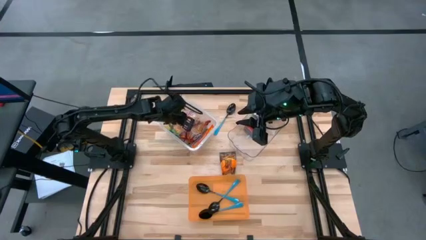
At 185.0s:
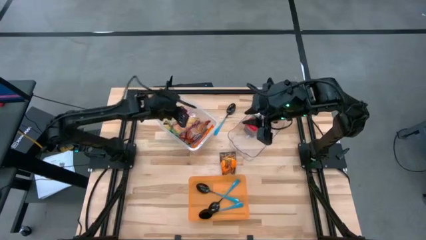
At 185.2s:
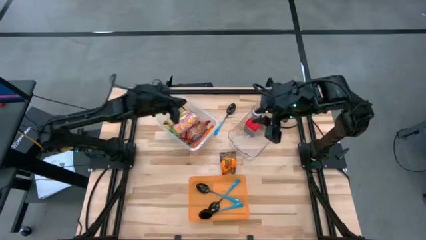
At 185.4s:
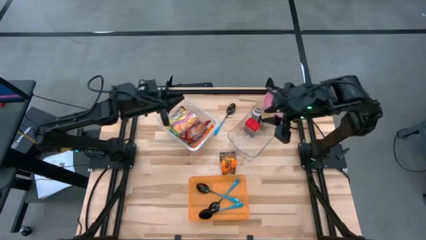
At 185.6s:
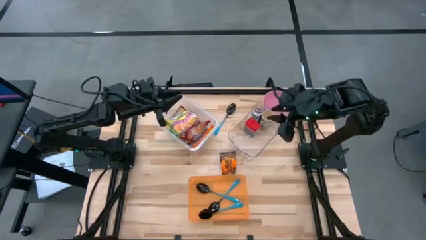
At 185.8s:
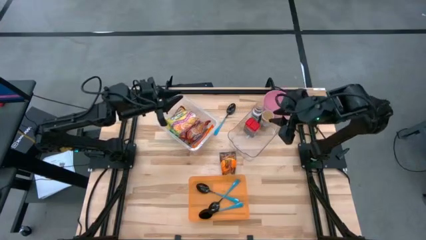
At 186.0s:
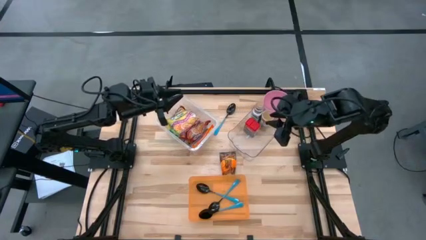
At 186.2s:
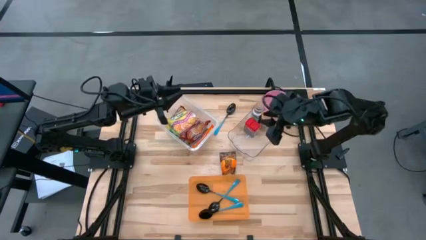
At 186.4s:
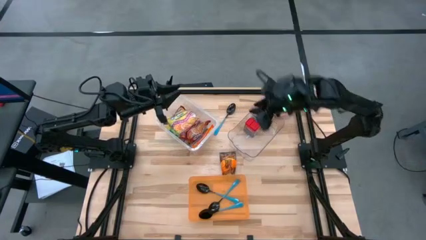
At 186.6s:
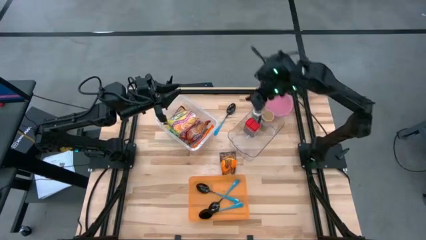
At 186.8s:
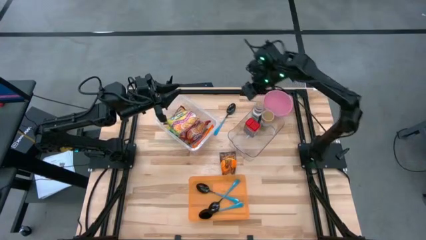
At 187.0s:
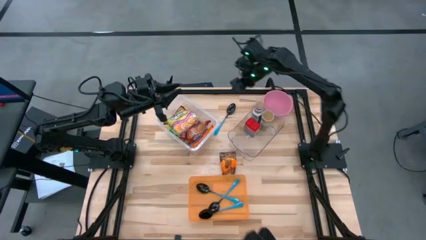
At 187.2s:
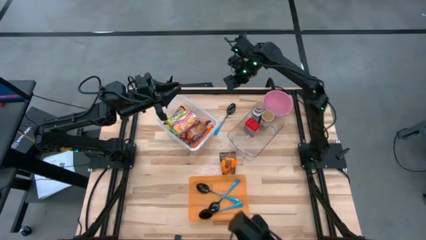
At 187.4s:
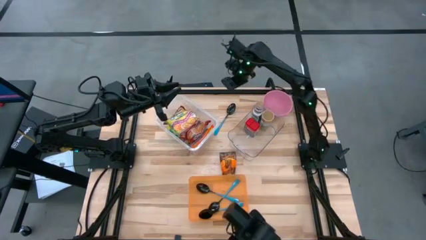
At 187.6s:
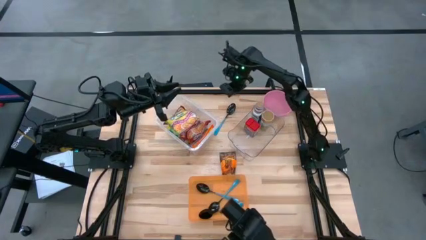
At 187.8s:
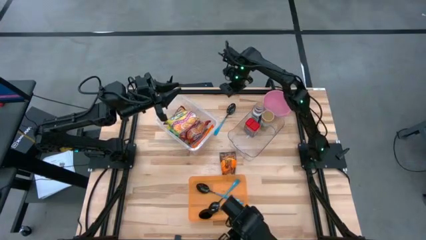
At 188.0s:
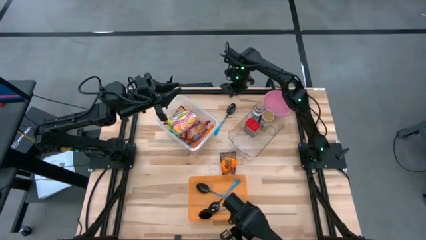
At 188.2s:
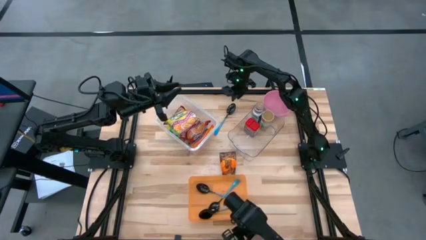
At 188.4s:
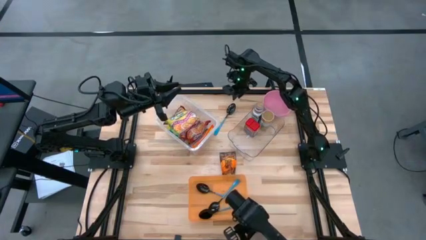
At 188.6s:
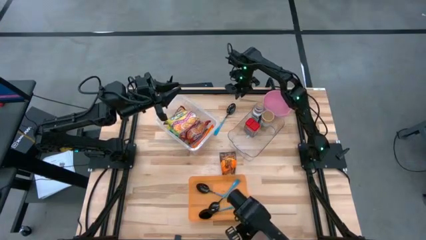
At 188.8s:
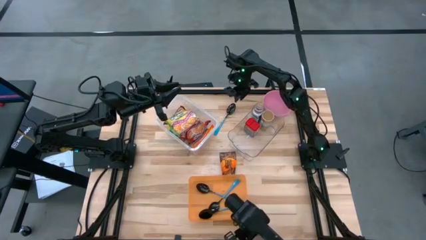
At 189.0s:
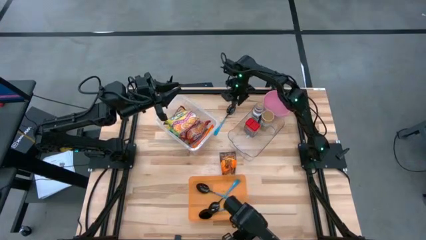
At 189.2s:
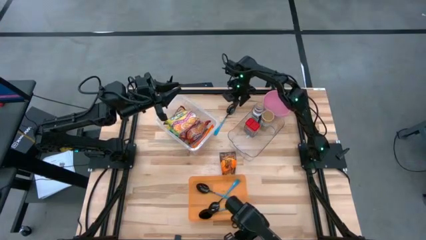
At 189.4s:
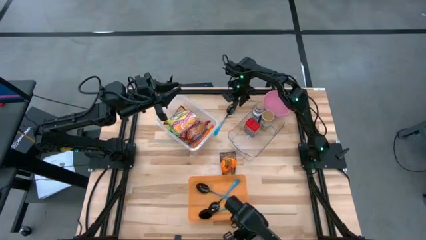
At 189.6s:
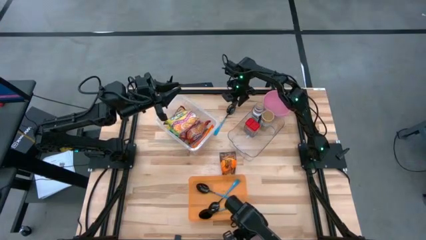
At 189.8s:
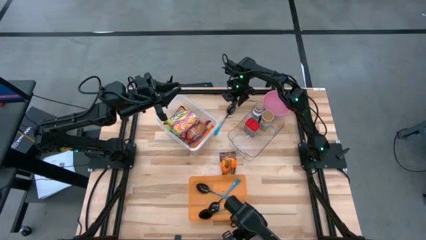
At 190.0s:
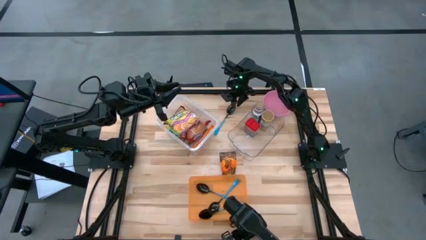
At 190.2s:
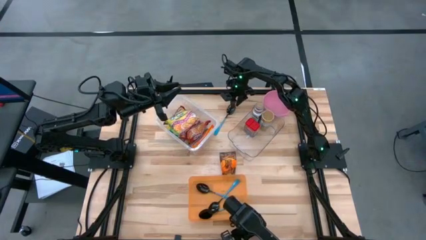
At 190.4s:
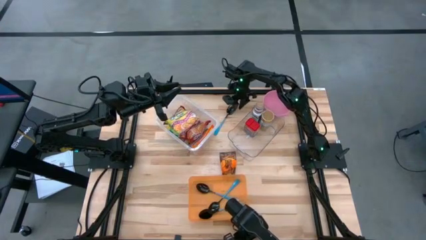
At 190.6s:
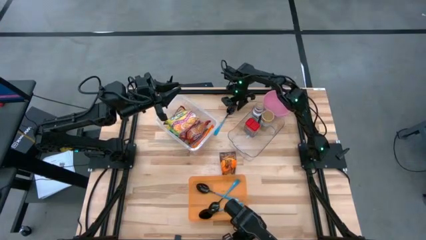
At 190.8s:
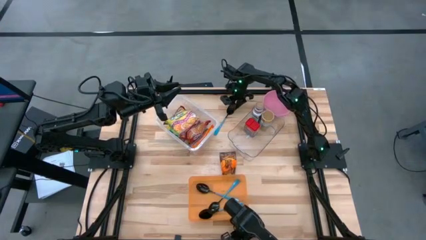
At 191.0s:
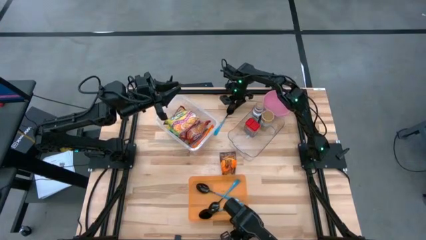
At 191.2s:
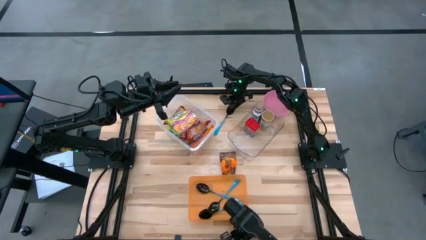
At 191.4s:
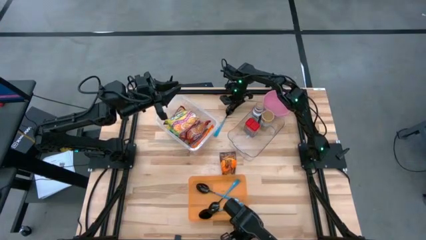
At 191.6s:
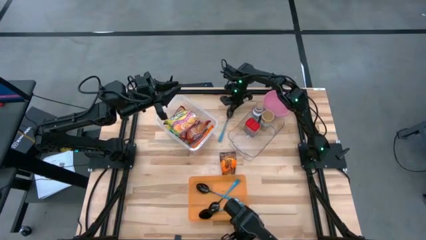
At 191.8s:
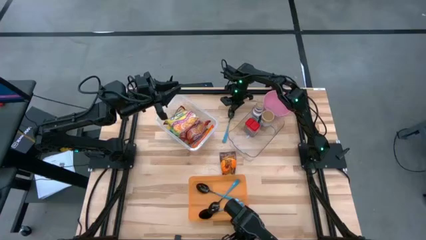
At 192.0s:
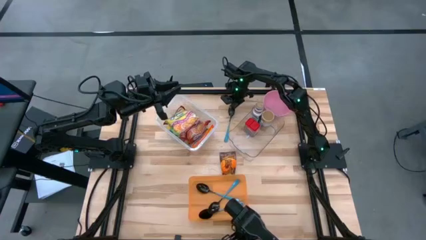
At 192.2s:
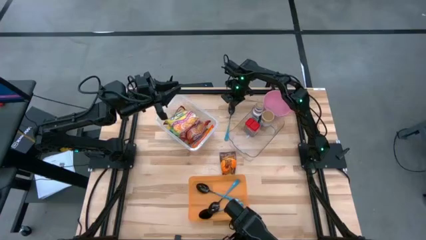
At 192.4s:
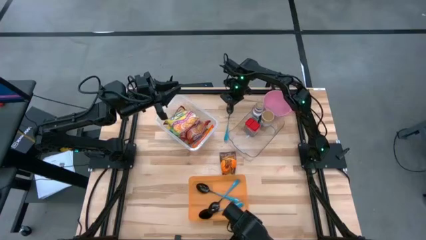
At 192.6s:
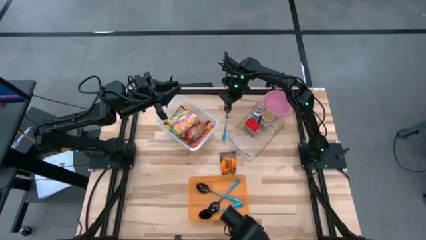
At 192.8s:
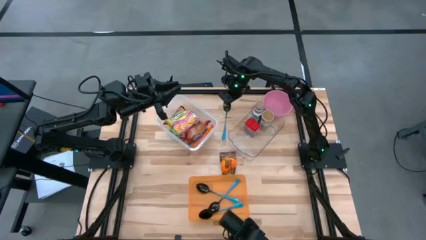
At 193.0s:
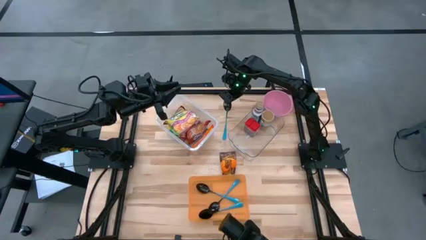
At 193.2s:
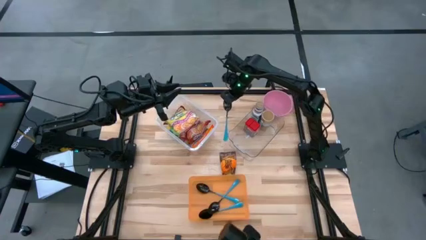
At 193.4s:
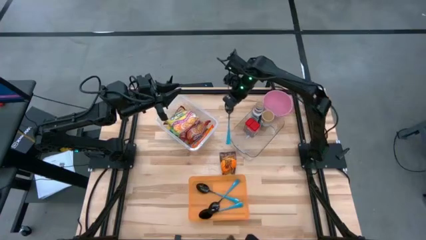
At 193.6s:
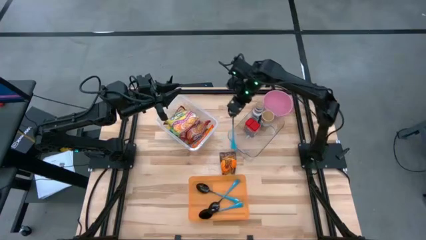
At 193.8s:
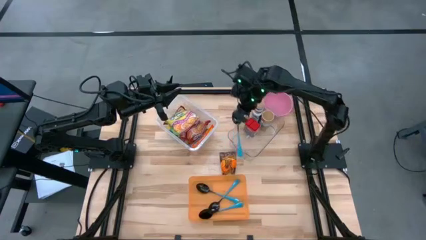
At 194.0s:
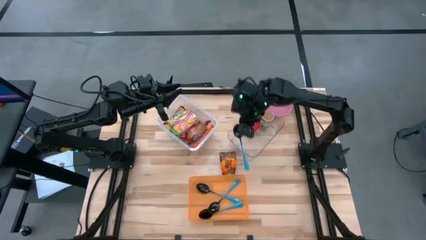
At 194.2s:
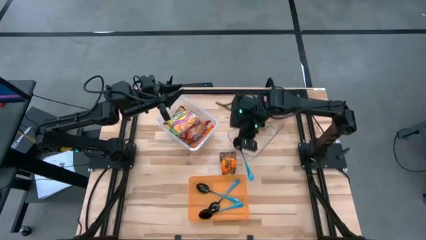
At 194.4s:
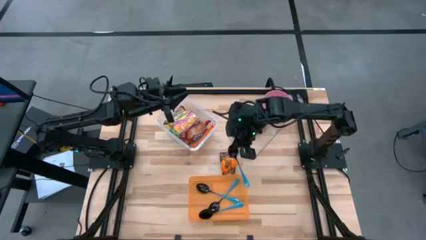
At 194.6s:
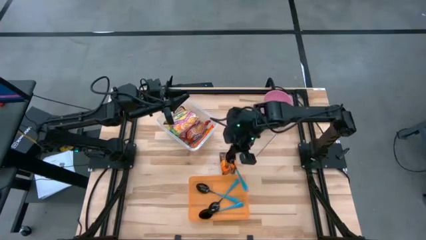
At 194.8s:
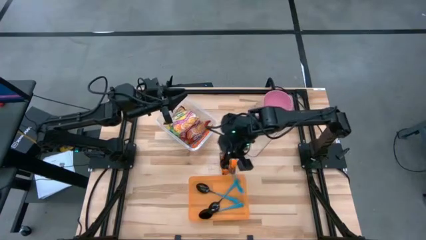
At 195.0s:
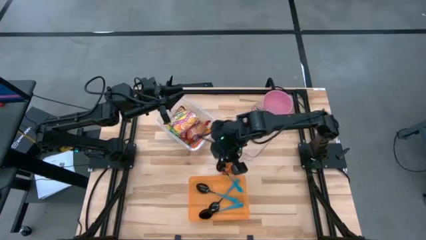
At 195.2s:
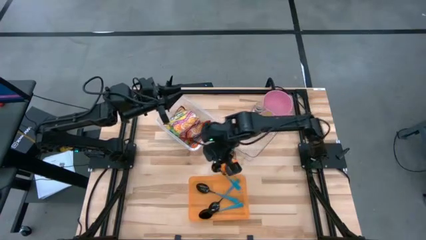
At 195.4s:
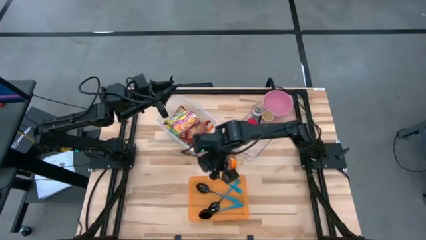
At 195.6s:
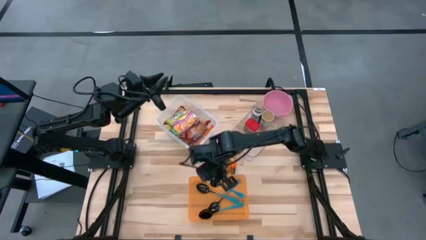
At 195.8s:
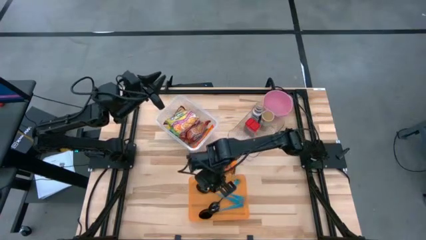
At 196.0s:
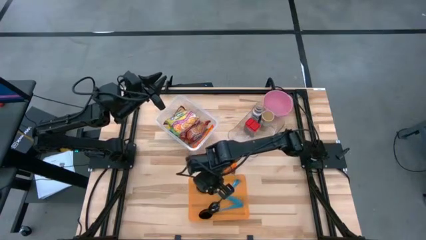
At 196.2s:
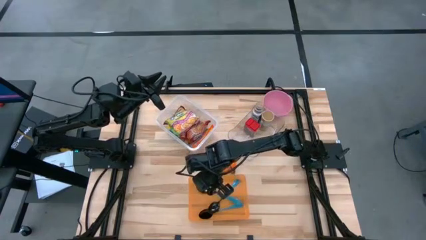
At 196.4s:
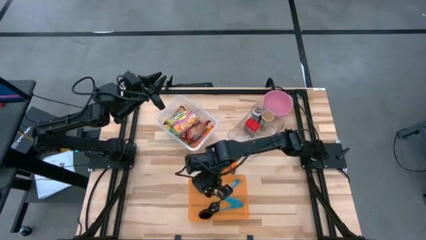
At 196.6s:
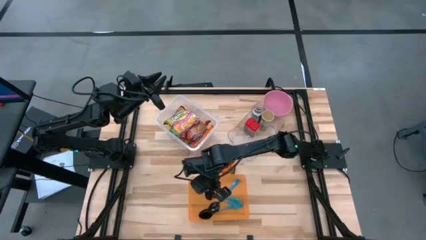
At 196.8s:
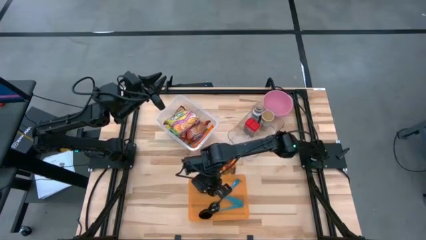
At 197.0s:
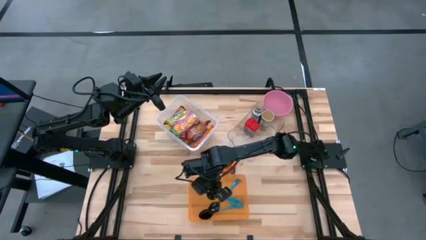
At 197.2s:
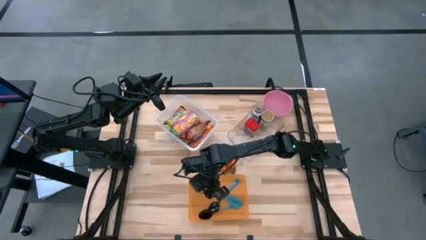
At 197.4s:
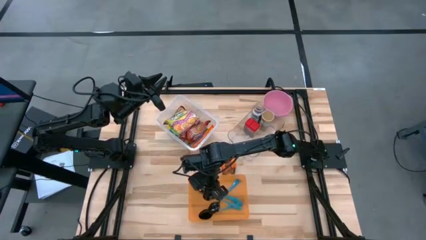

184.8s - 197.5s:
Task: Pick & Place Food Item
Put the black spoon into the orange bin

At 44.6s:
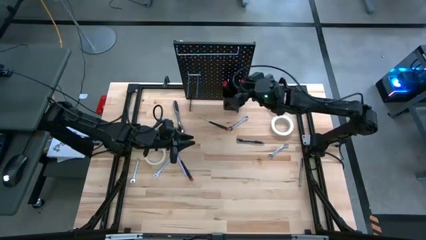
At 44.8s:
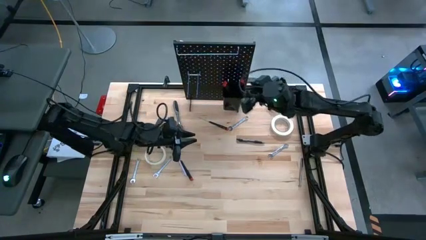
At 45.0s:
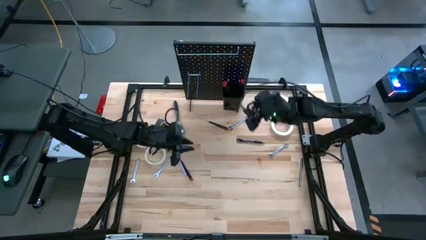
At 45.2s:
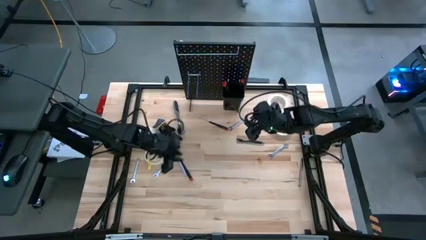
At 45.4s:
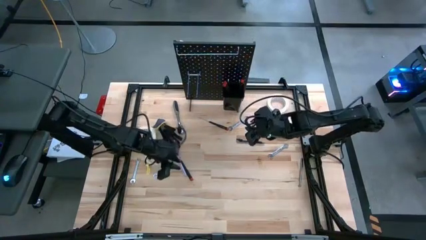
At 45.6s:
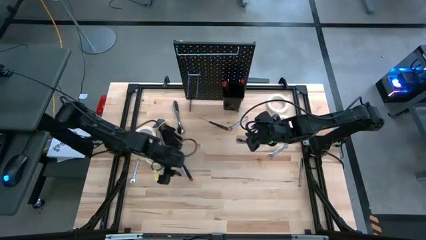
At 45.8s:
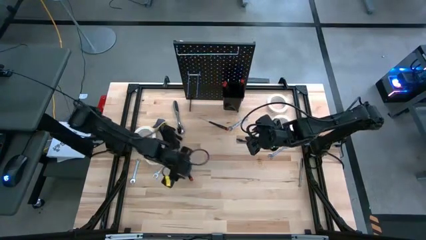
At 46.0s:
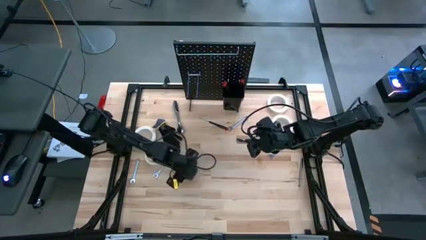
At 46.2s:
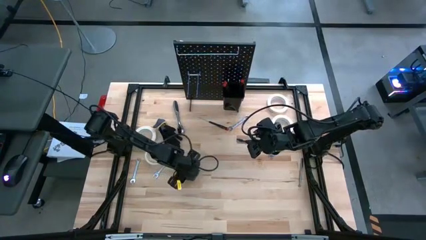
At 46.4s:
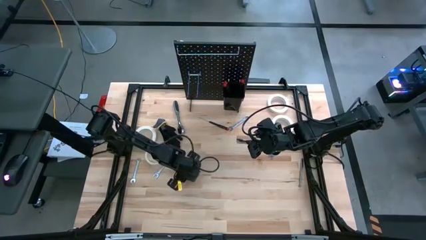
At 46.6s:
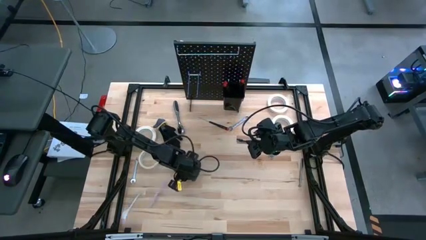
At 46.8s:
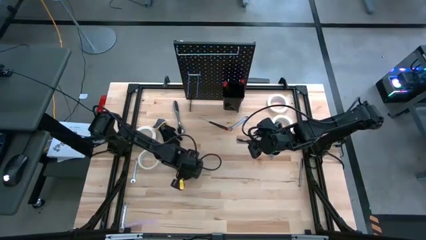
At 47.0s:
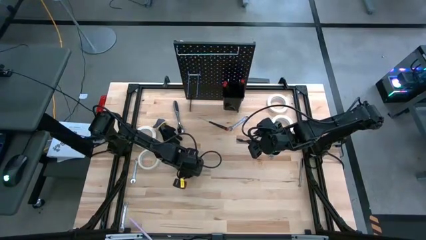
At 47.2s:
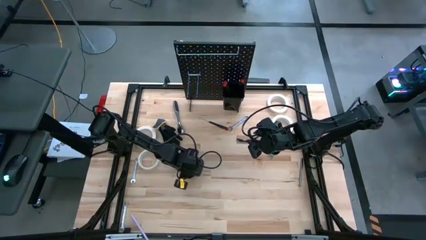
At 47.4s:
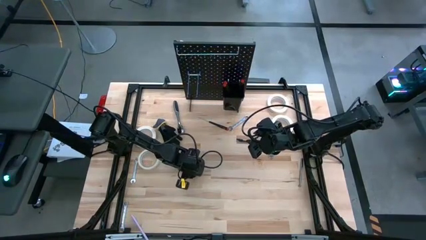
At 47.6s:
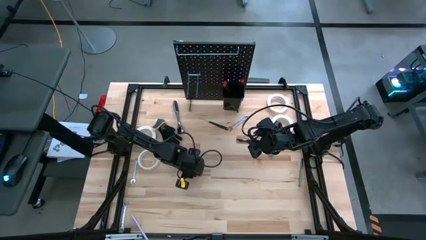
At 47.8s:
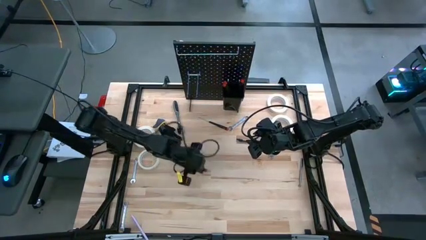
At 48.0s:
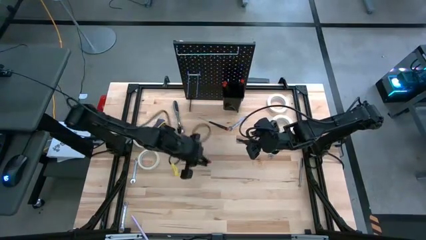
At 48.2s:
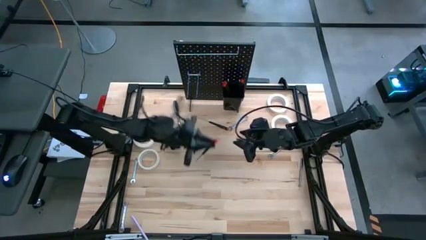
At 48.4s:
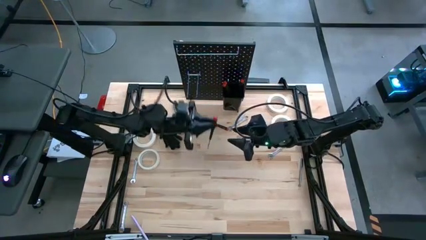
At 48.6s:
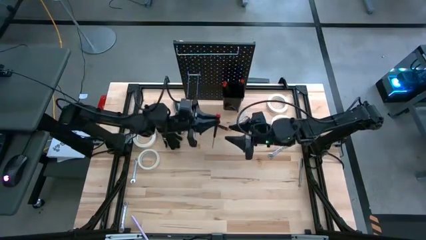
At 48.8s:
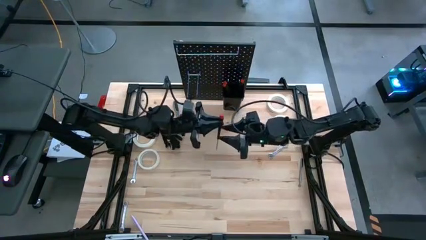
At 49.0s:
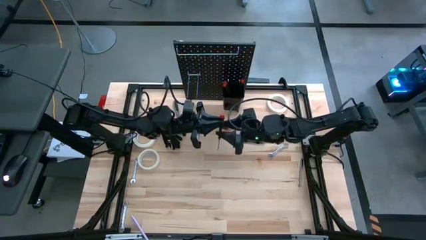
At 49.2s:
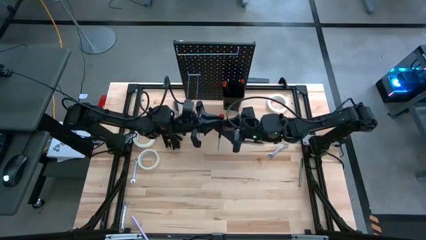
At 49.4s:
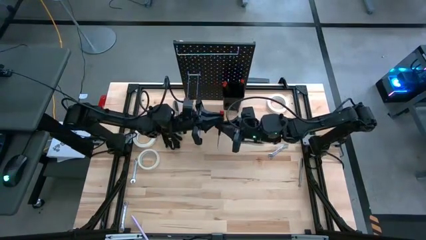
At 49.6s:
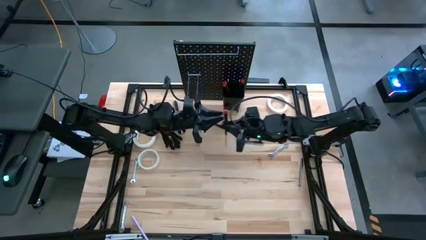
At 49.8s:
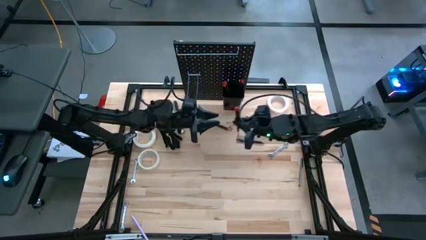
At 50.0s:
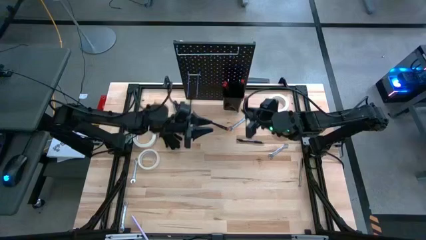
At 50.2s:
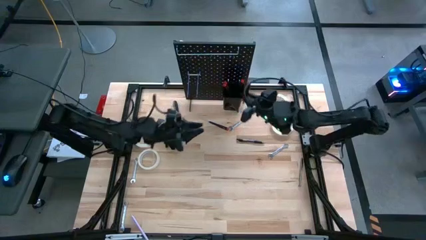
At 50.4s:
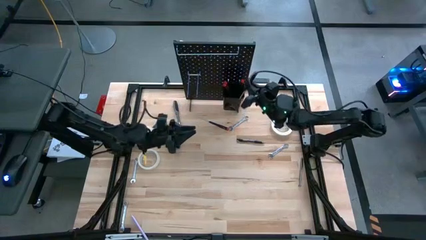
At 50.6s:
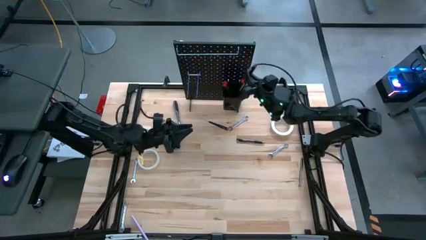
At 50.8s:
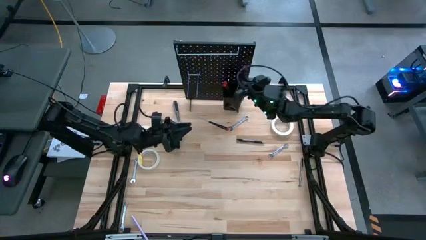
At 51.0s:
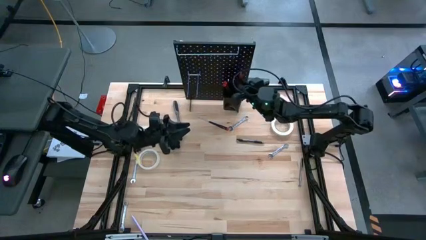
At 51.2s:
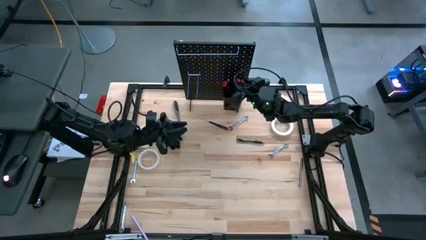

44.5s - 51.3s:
Task: Hang tools onto peg board
Put the nut driver into the black bin on the pegboard
